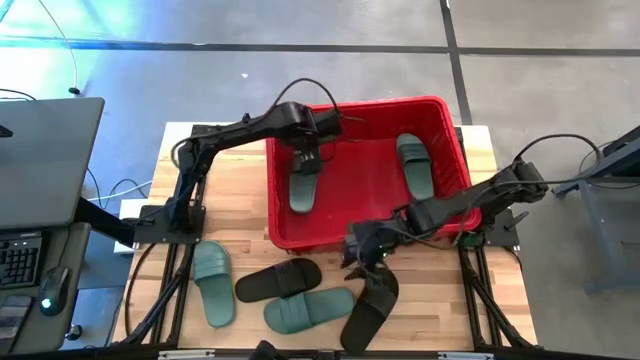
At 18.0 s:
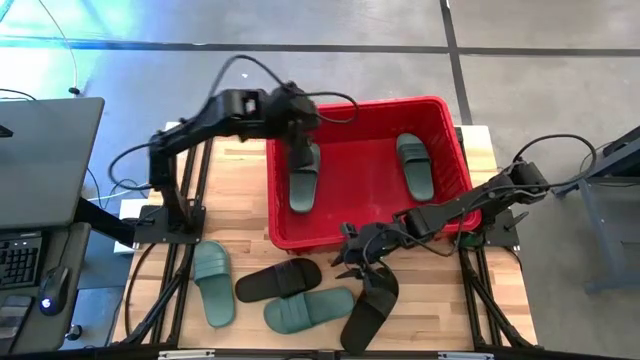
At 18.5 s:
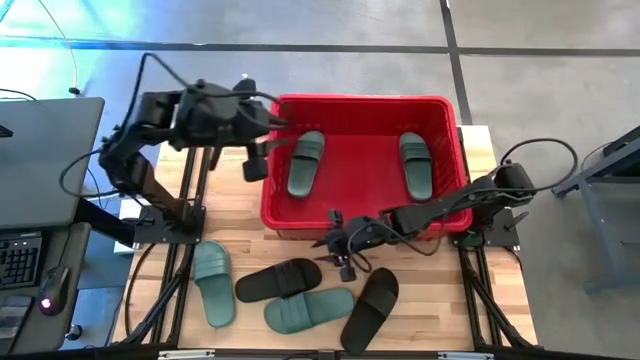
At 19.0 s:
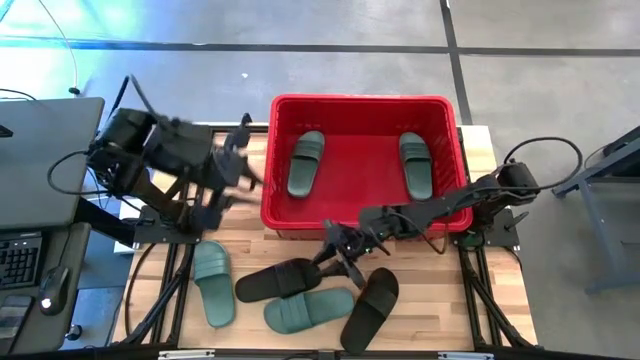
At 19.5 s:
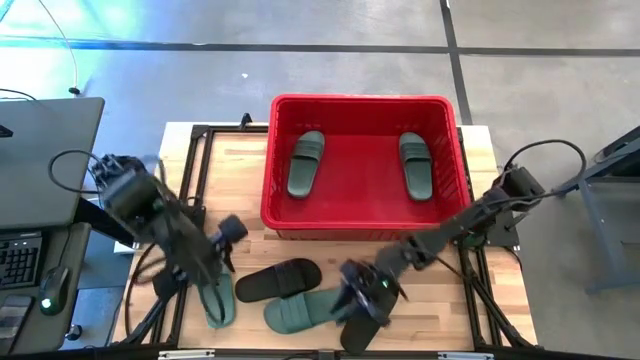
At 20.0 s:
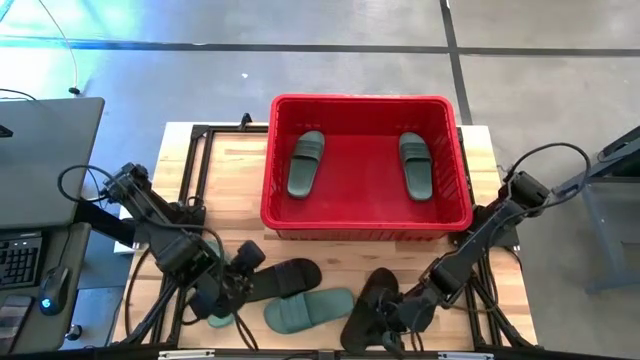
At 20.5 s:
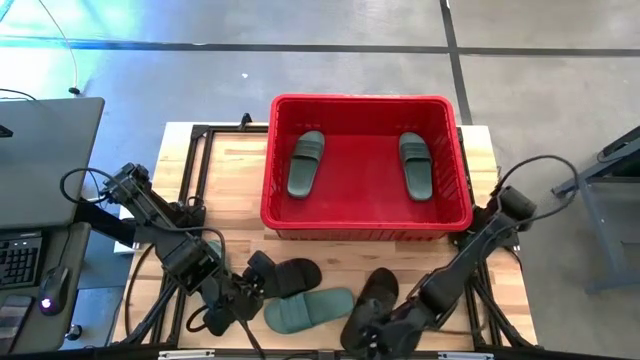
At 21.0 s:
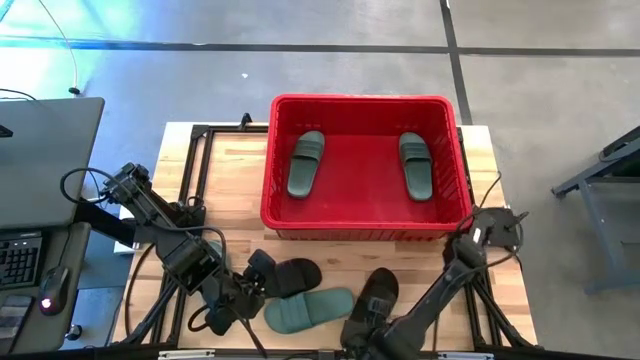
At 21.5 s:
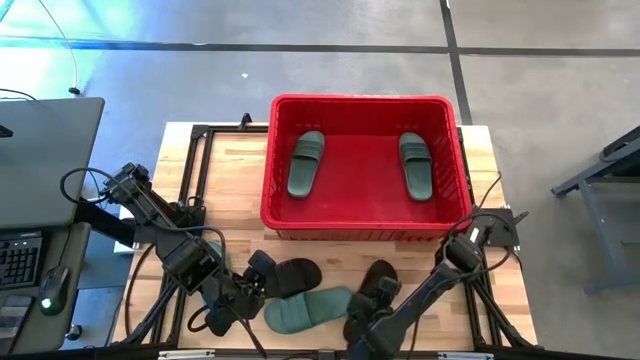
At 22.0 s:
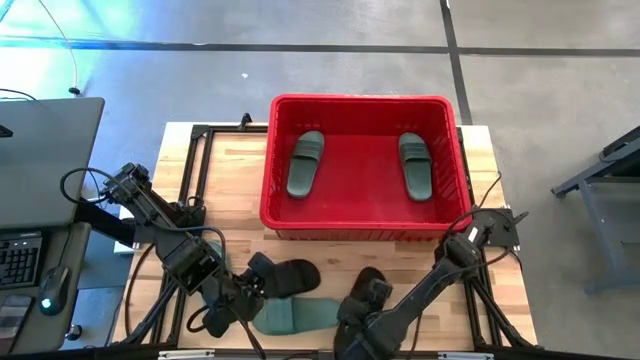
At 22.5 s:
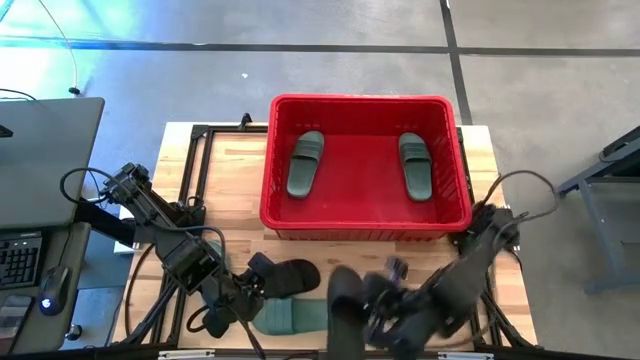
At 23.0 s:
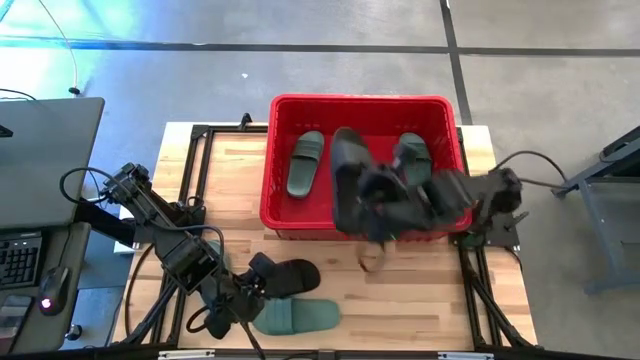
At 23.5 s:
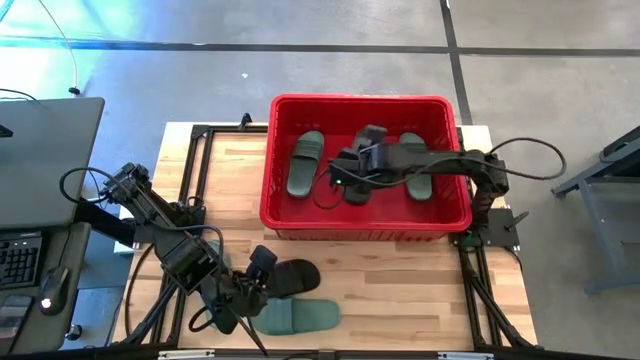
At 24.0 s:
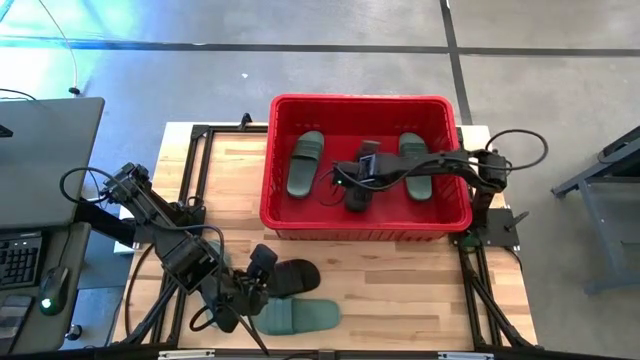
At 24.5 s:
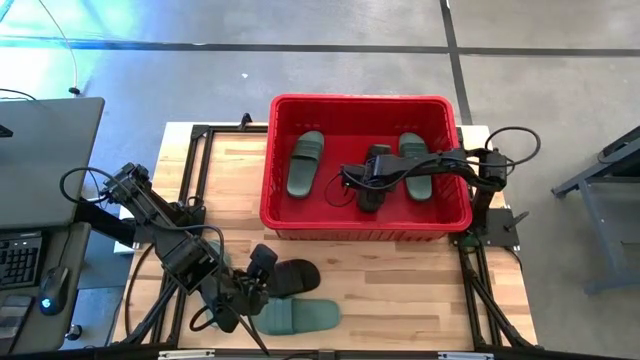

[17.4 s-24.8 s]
Task: Pick and place slides into bin
Put the black slide in the red bin

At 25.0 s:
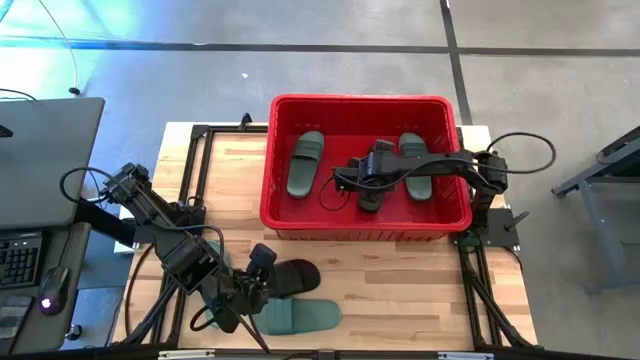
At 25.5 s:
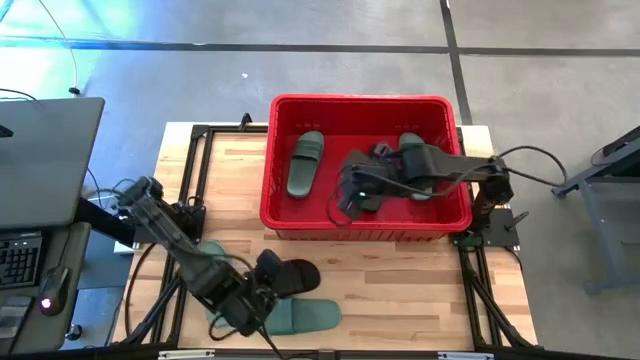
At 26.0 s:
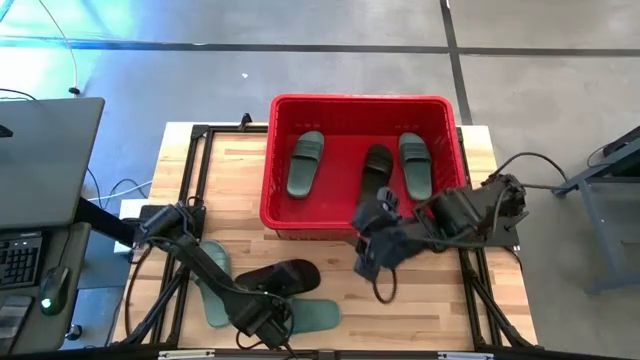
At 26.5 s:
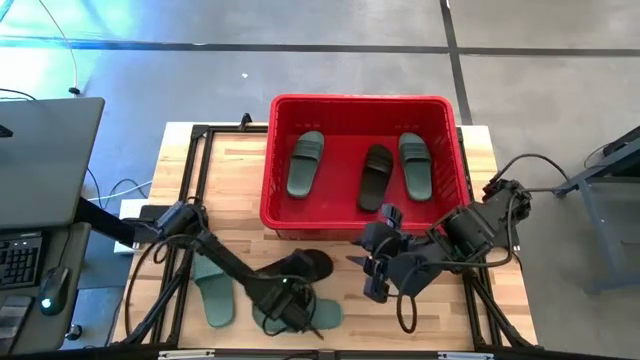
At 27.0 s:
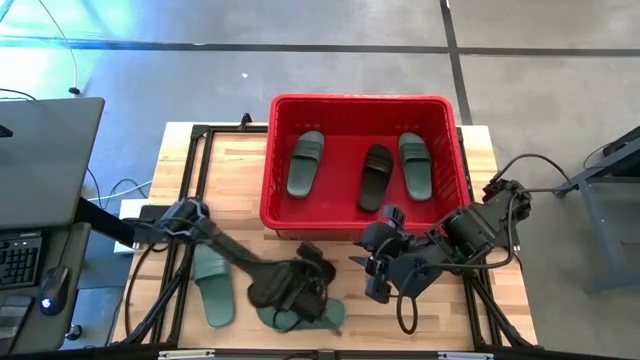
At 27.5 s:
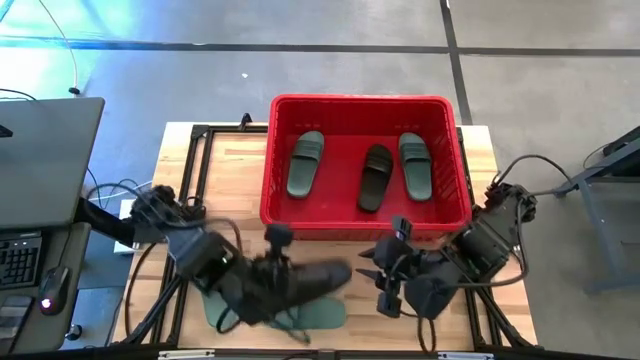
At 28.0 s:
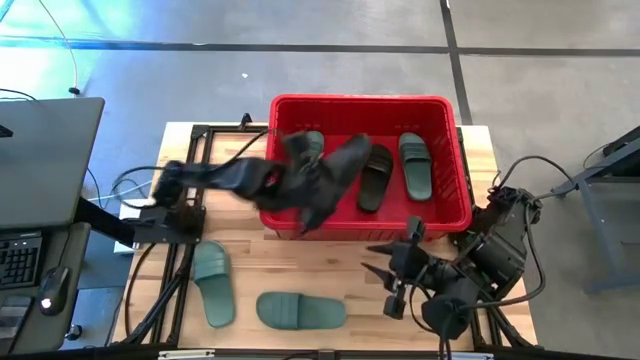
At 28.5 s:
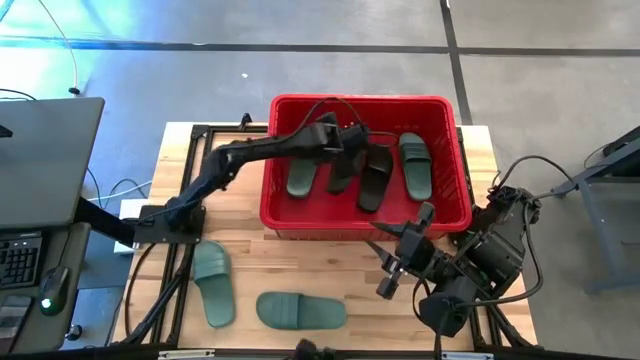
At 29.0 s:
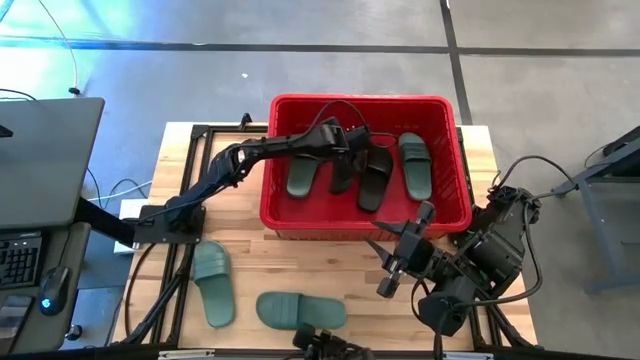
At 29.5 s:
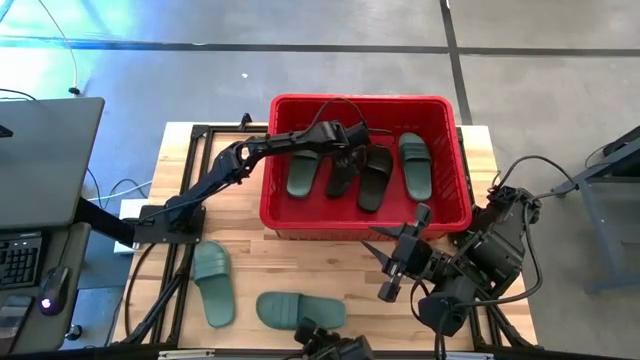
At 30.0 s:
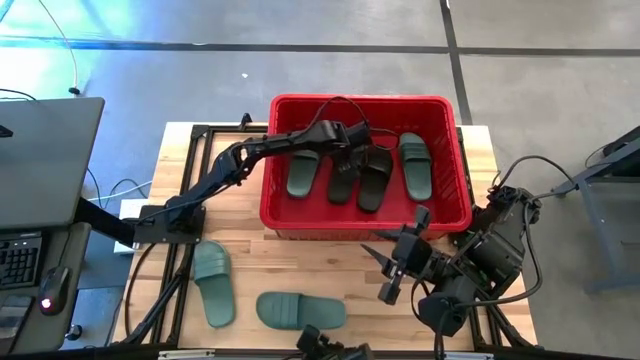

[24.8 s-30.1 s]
Put the black slide in the red bin

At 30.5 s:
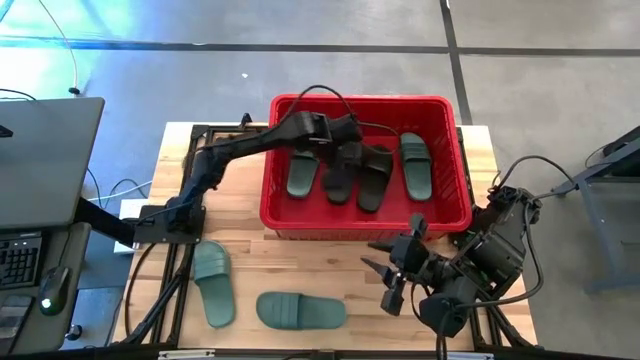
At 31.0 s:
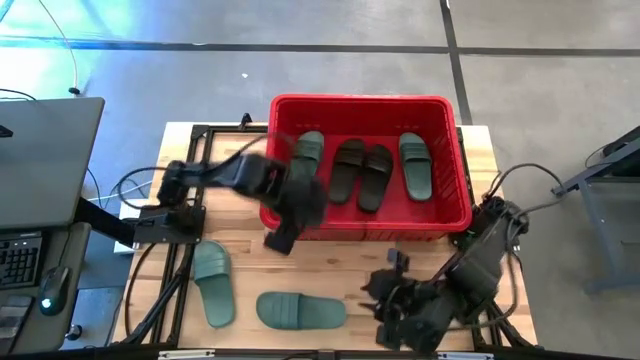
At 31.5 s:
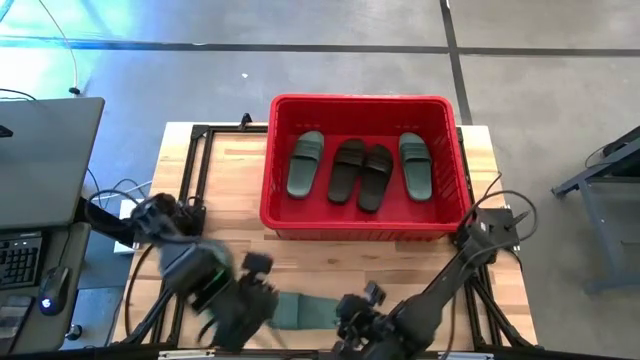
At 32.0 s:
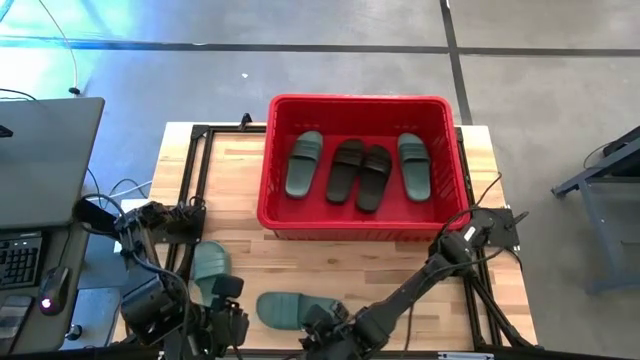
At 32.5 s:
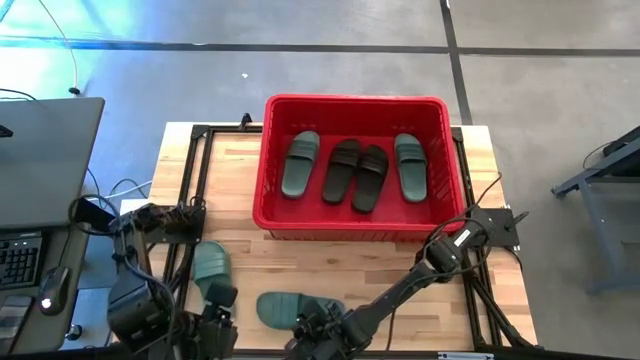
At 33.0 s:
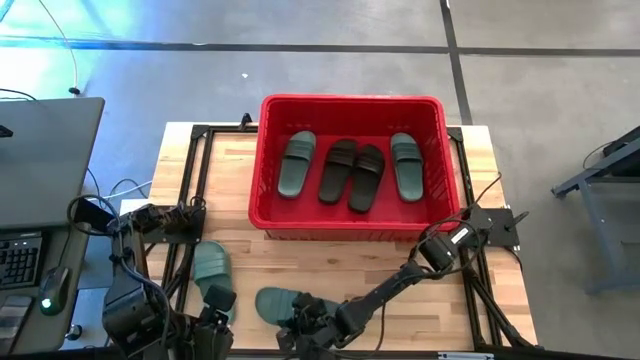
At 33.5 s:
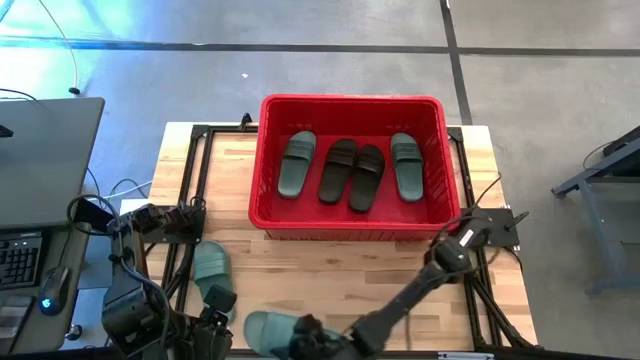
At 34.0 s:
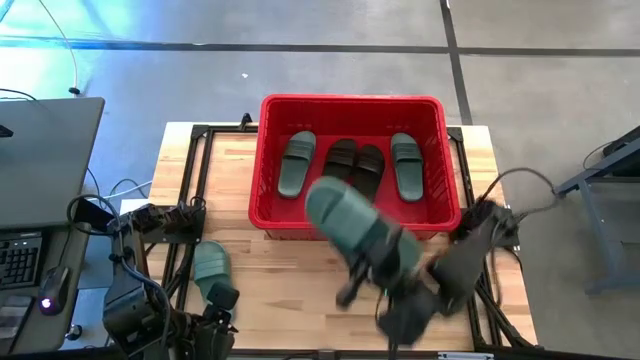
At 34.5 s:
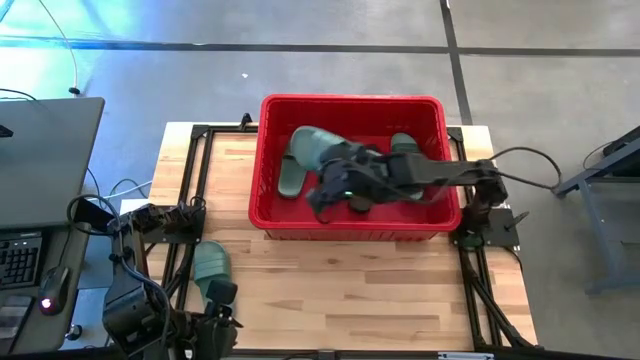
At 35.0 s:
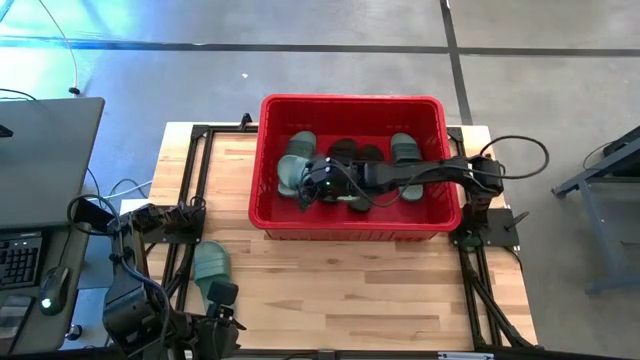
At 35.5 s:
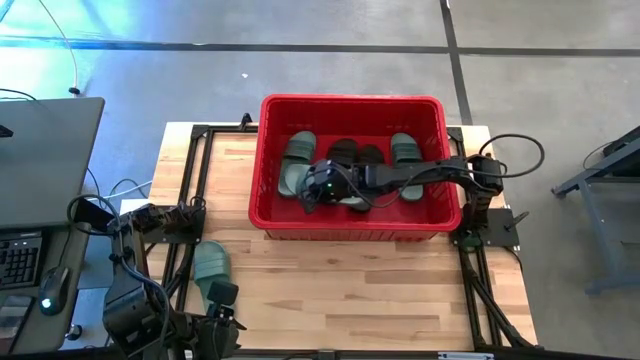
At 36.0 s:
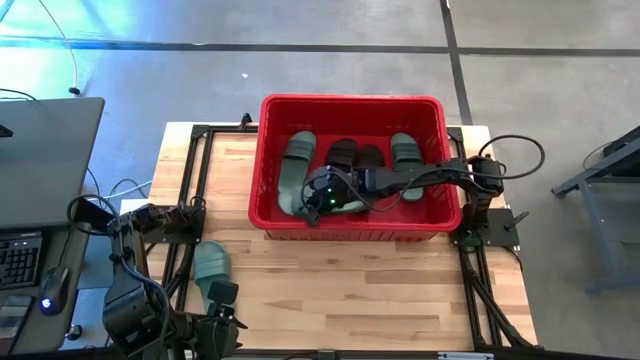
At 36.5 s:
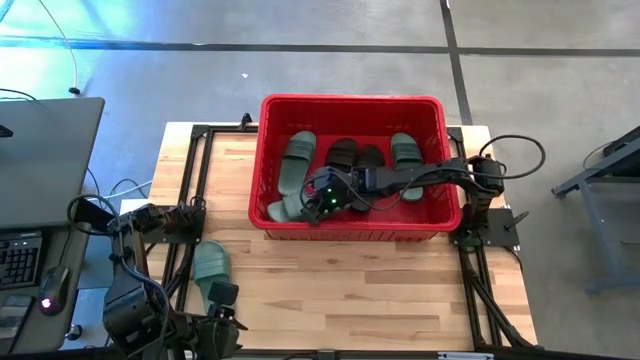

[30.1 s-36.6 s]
Put the green slide in the red bin

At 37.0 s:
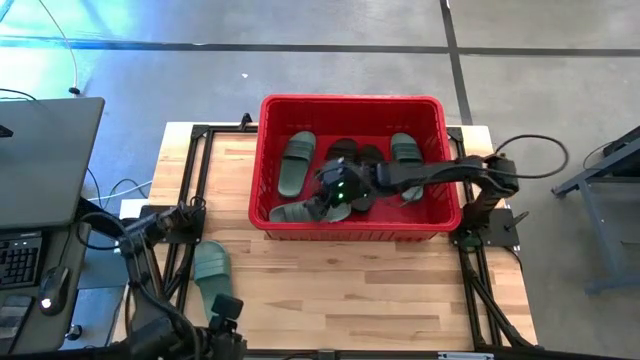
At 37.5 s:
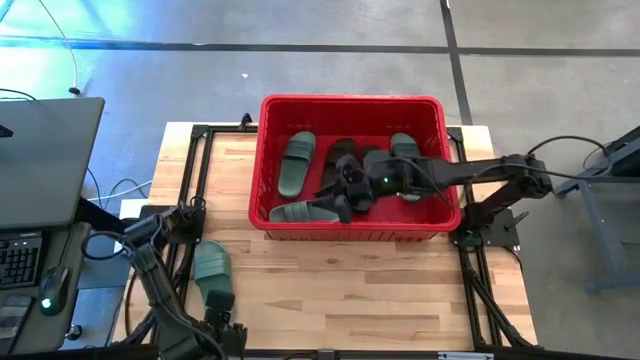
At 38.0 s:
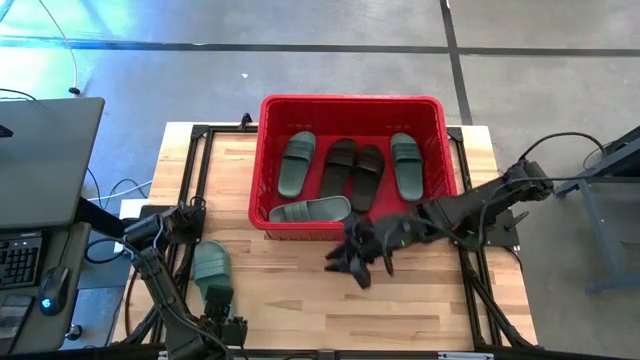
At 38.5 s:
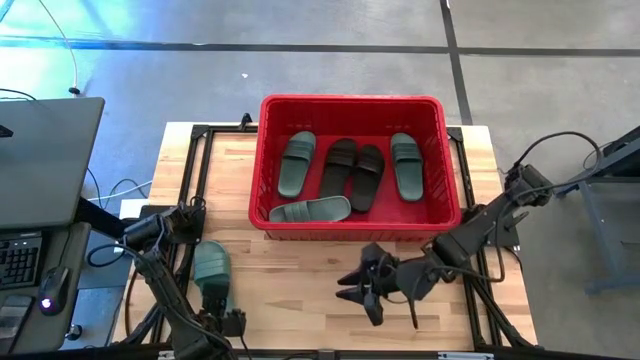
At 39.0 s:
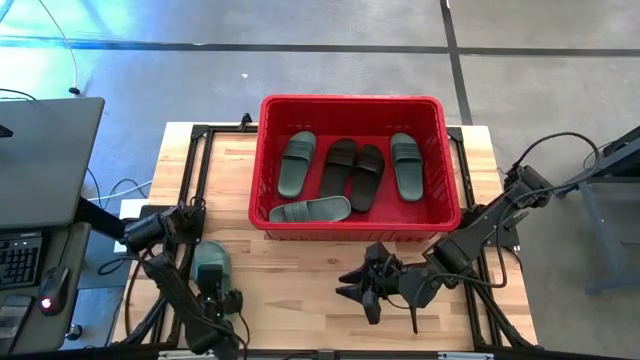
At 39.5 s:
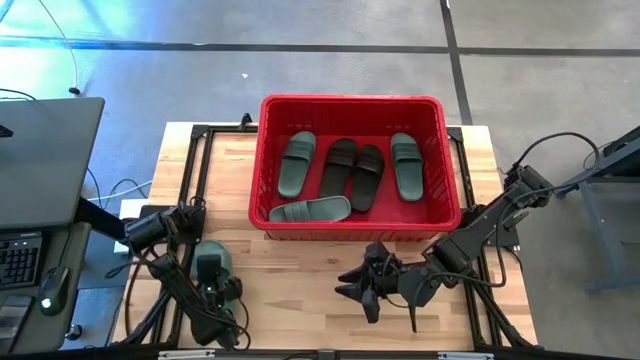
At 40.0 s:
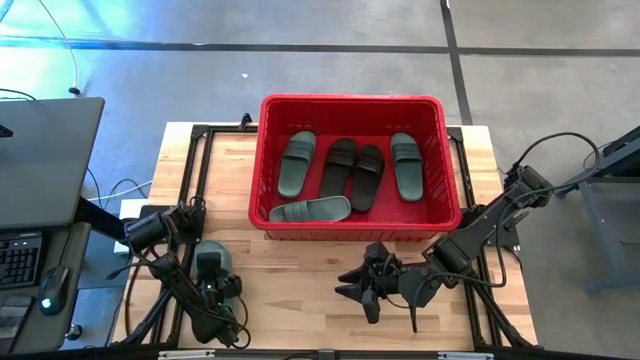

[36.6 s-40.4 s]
Put the green slide in the red bin
